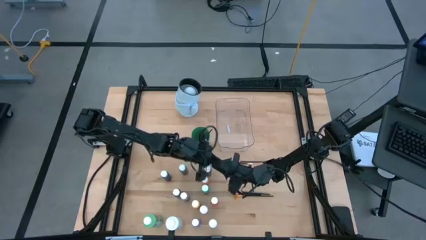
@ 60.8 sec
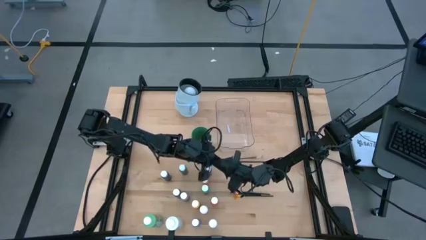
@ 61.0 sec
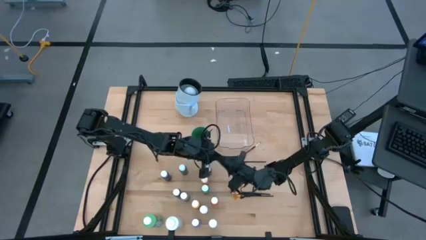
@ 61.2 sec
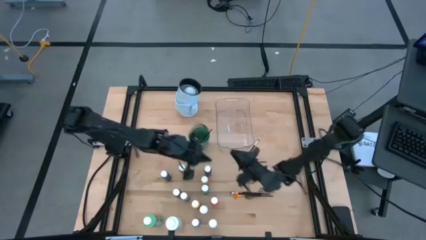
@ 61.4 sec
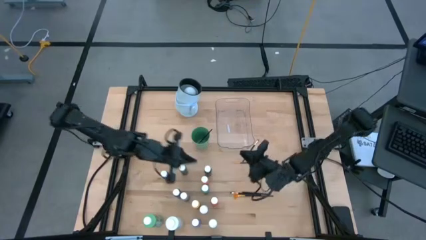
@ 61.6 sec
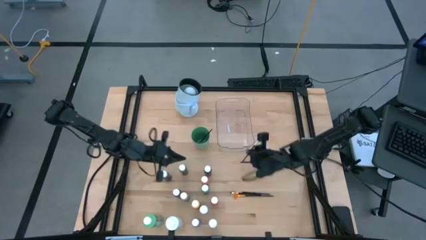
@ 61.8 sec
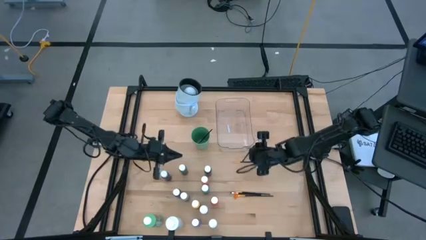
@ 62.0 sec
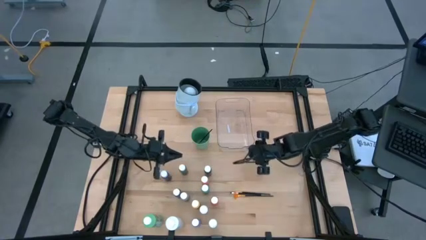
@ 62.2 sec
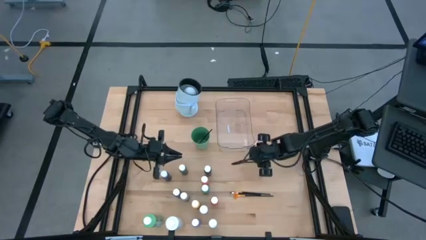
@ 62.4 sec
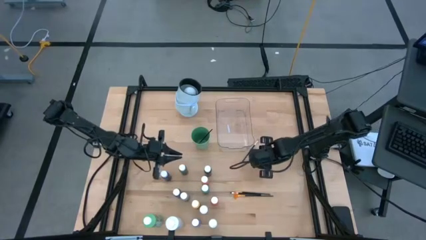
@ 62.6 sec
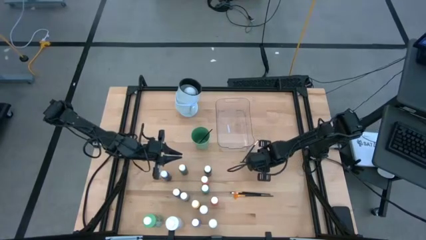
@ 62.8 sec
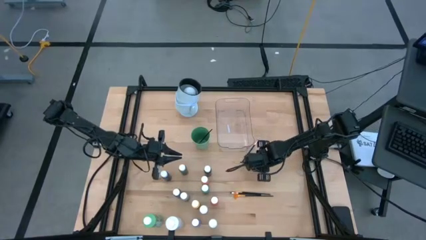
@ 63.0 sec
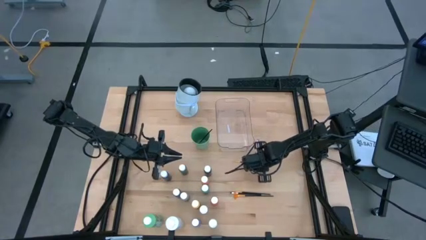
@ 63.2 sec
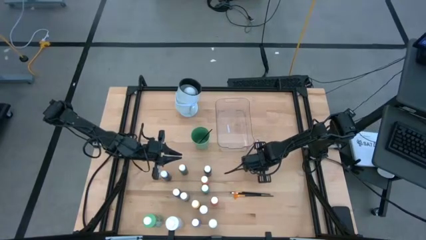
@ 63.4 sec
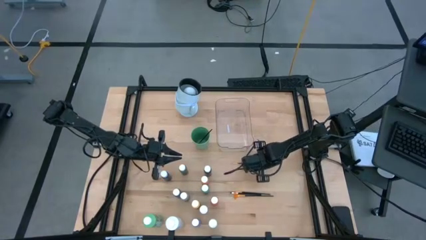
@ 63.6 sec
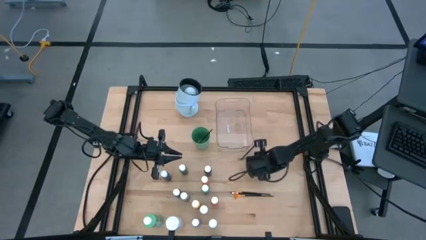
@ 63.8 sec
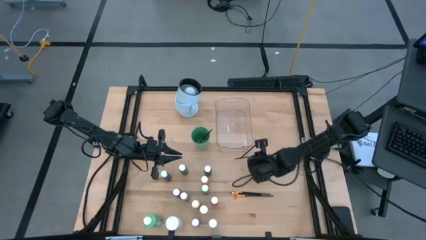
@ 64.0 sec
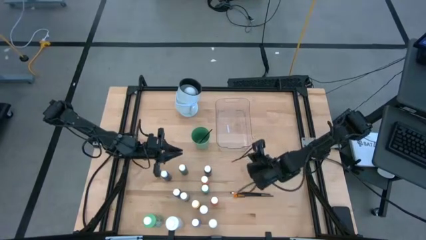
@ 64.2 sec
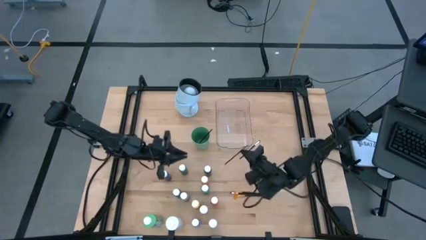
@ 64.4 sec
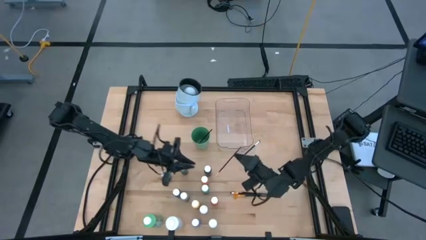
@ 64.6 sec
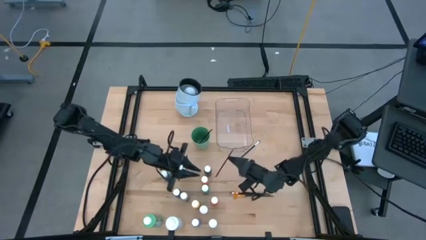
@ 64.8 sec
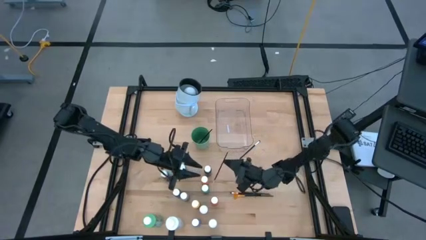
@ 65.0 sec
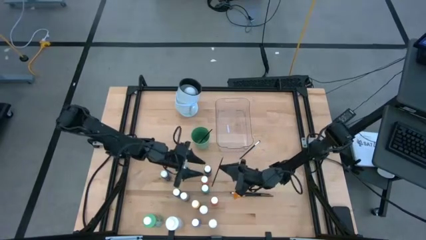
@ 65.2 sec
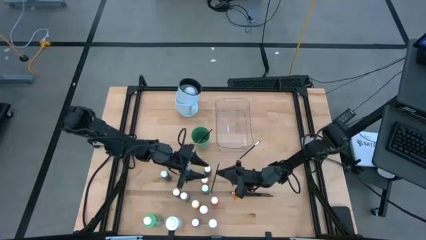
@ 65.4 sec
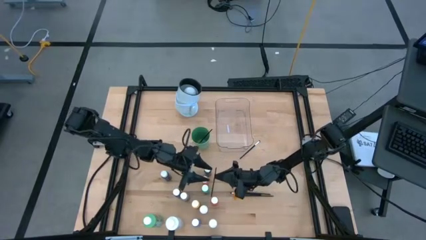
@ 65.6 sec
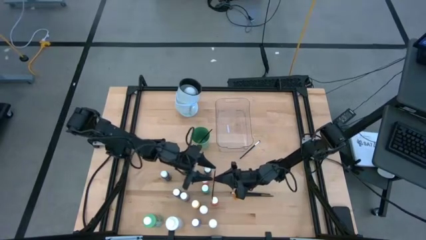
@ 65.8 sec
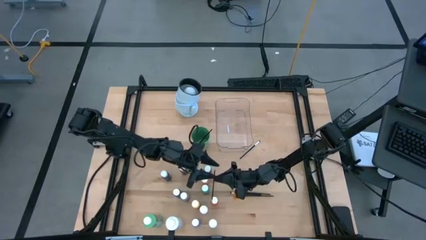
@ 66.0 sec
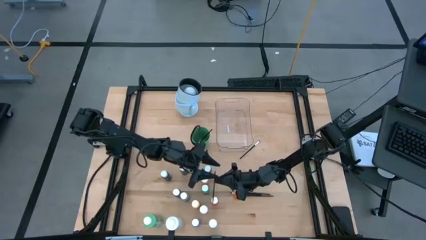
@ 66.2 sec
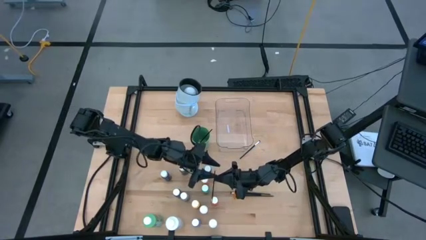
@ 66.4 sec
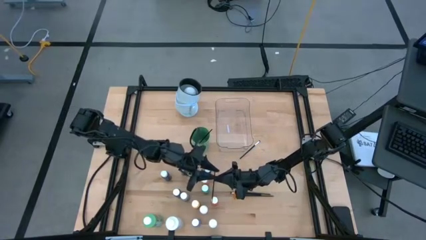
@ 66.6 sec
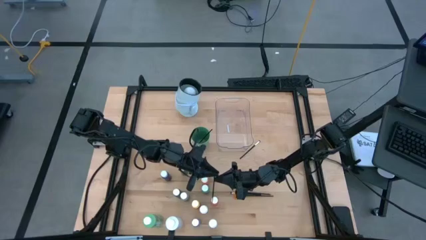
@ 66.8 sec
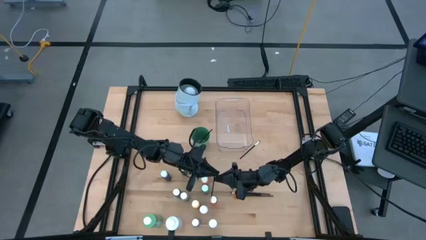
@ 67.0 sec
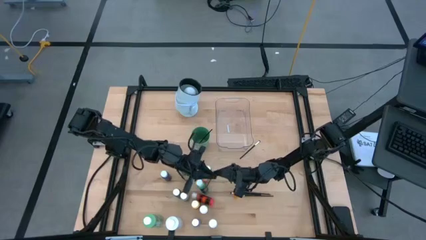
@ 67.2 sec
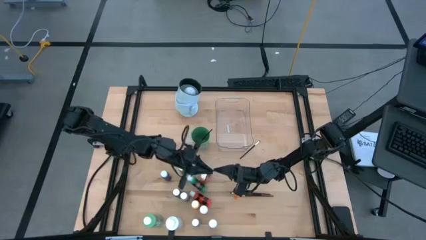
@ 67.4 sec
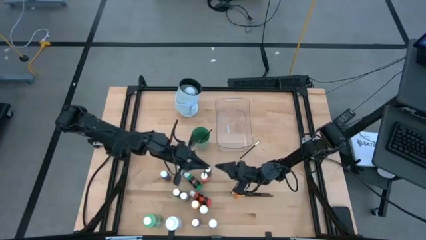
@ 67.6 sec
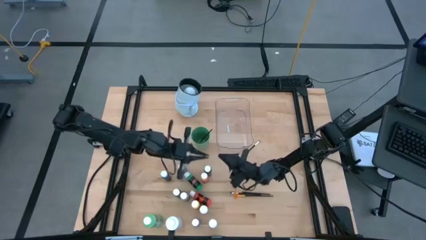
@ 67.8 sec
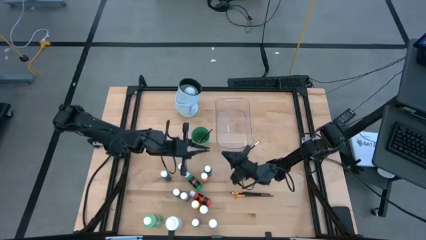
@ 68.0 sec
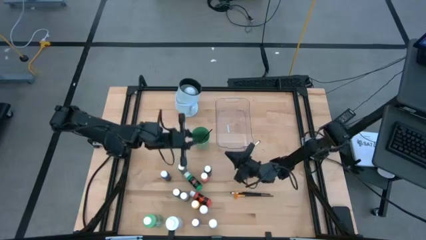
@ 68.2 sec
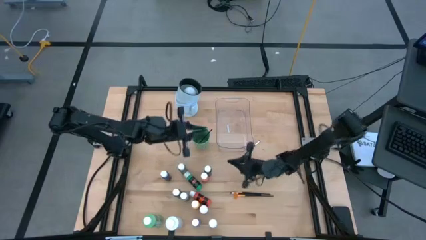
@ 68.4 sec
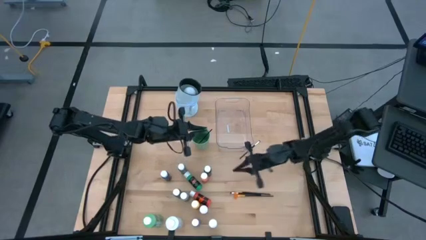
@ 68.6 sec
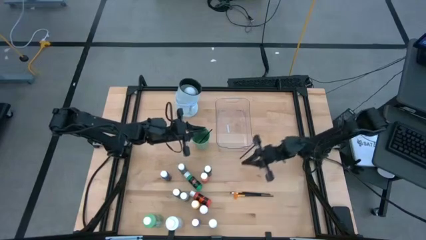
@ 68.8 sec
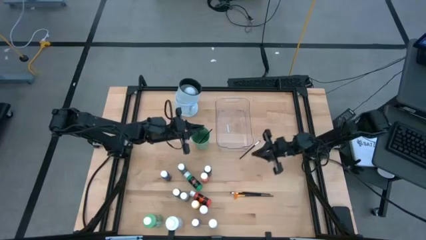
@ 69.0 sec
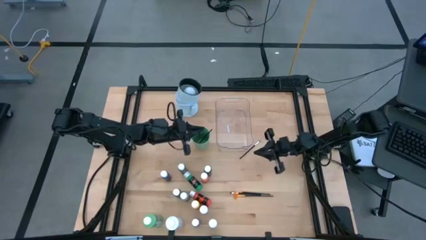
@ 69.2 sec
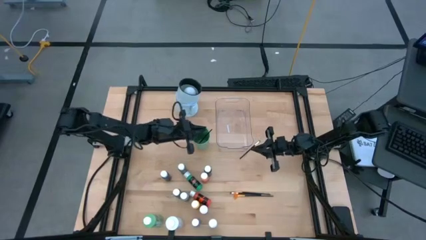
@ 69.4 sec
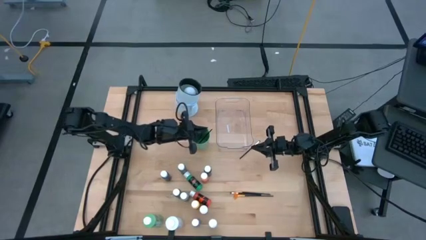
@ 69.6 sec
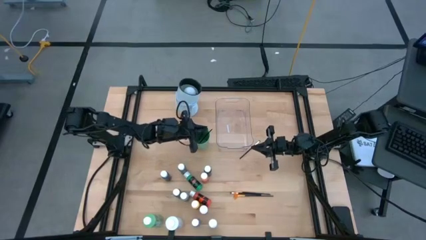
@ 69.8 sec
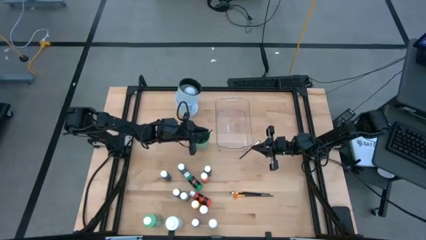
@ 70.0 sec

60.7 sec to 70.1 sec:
Task: Pick & Place Paint Supplies
Put the yellow paintbrush into the green cup

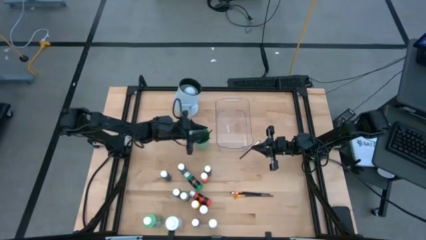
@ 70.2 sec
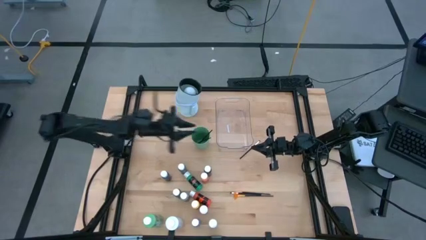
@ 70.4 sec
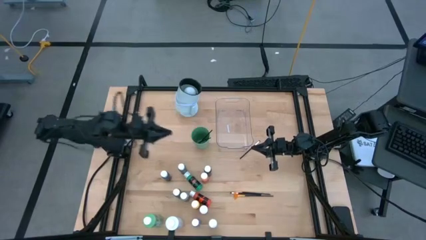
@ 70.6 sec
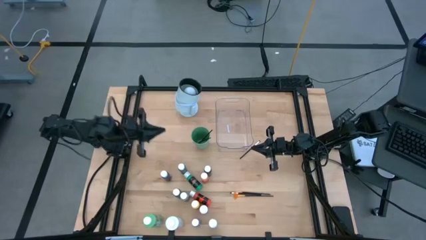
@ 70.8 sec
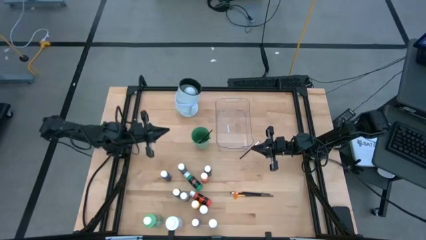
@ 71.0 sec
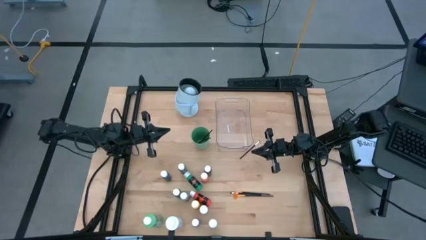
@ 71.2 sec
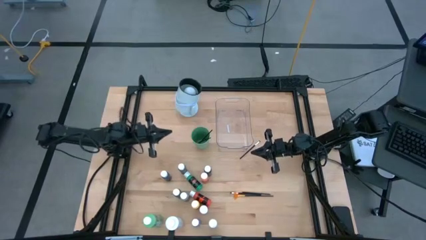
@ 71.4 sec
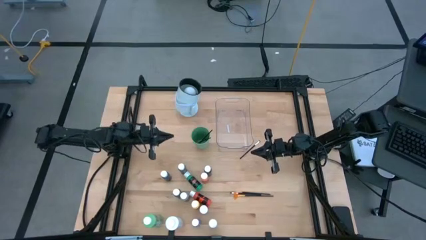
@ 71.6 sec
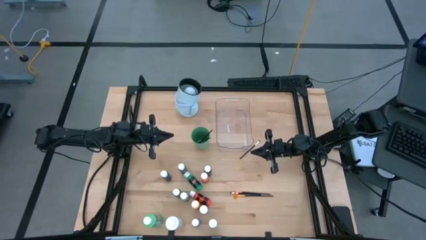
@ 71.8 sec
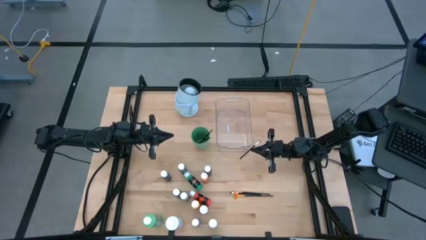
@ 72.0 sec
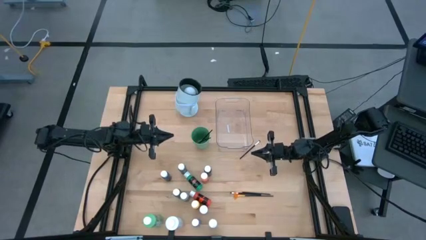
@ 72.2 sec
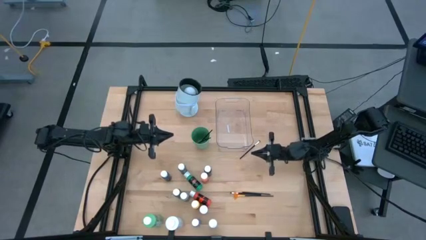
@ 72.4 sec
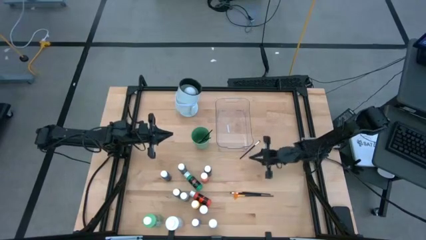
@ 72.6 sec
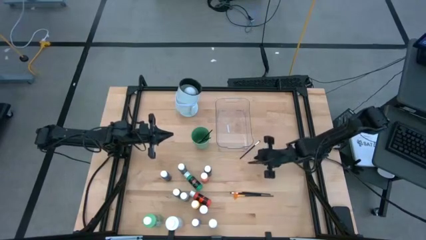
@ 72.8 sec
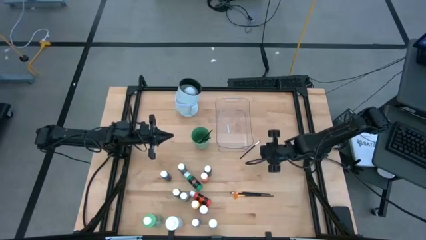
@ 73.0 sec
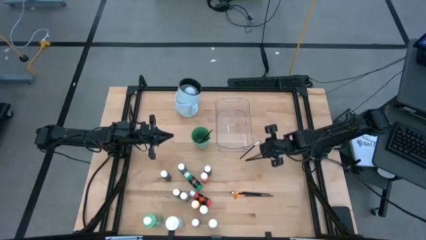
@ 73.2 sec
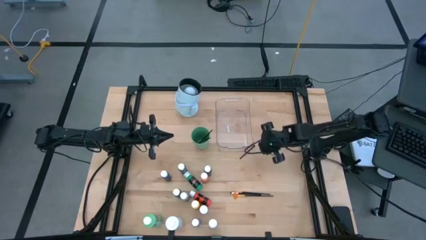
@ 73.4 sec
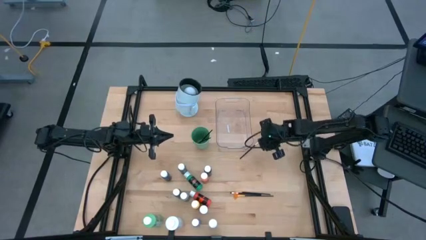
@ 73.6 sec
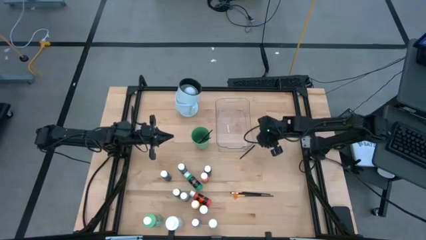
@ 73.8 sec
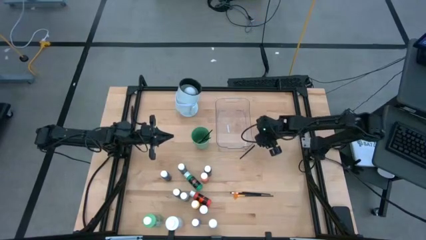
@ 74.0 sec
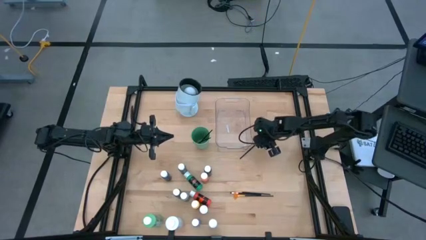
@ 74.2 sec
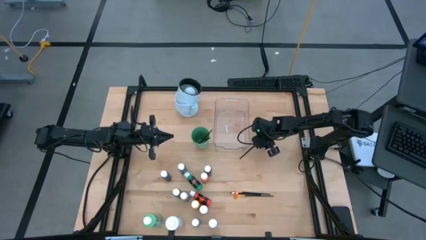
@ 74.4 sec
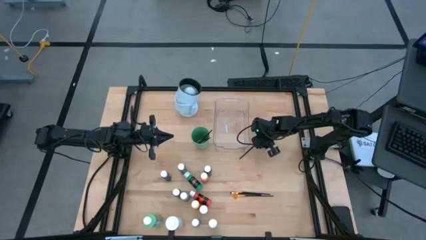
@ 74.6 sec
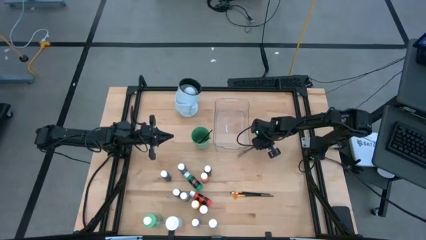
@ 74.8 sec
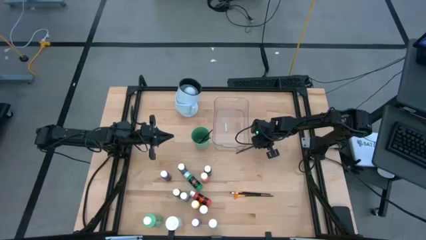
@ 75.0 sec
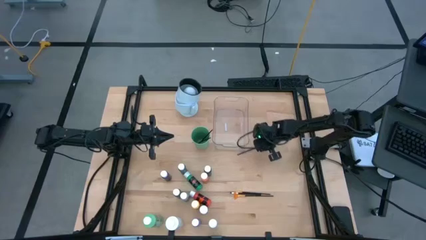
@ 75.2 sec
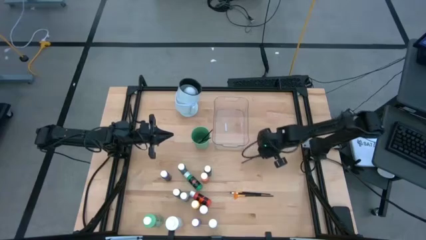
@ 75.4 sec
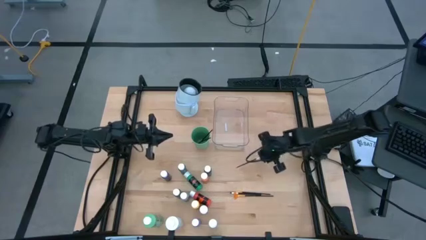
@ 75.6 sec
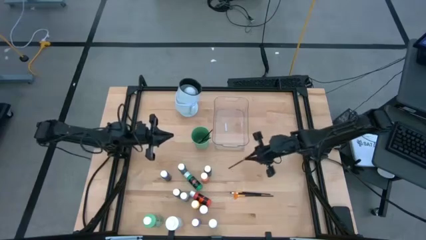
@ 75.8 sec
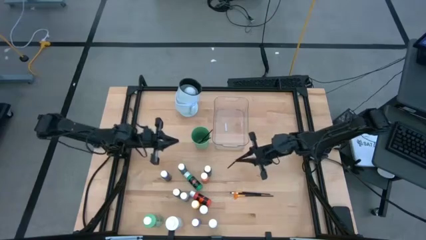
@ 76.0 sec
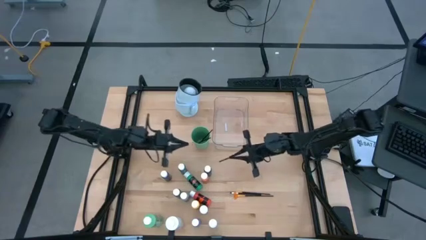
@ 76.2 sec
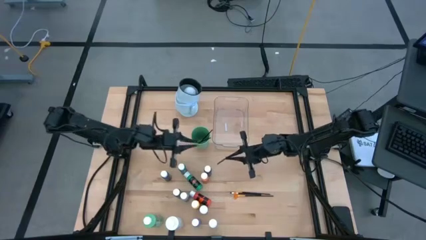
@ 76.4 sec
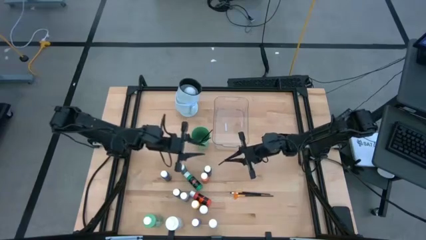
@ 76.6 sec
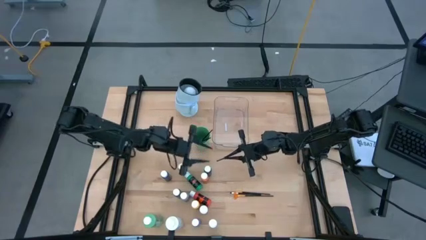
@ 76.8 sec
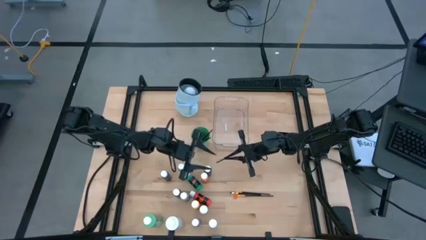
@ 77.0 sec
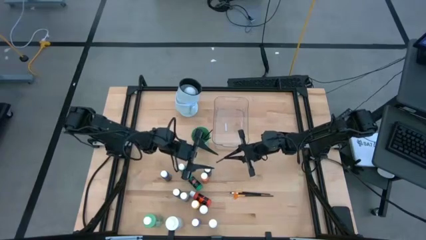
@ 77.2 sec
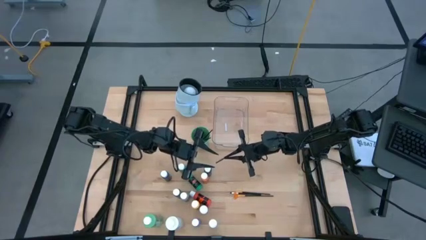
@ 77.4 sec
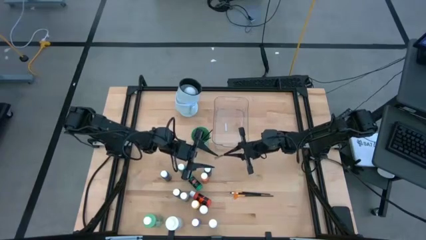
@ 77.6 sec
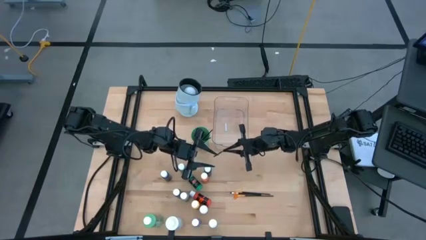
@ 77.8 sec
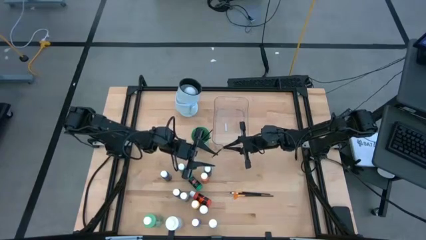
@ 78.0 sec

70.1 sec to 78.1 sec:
Put the white paintbrush into the green cup
